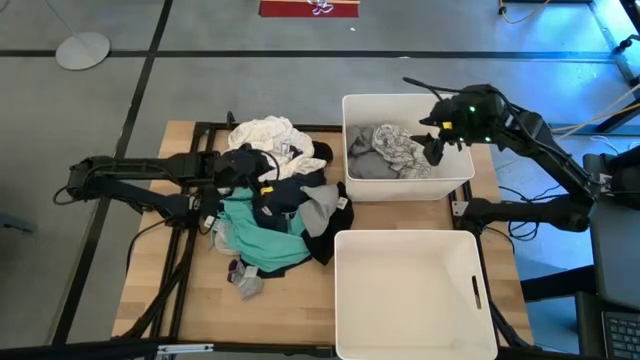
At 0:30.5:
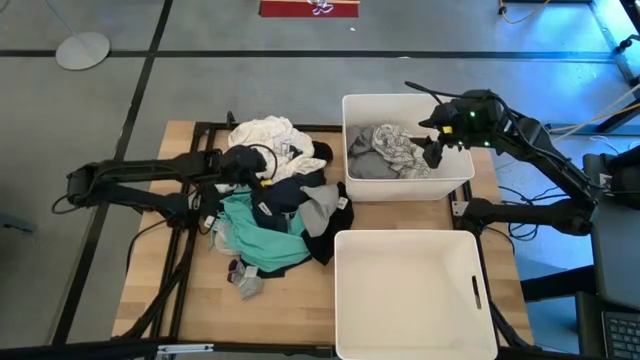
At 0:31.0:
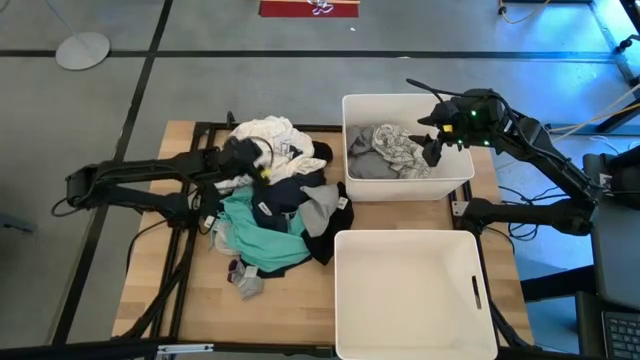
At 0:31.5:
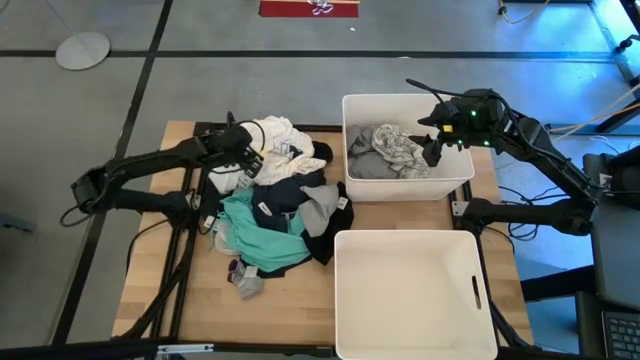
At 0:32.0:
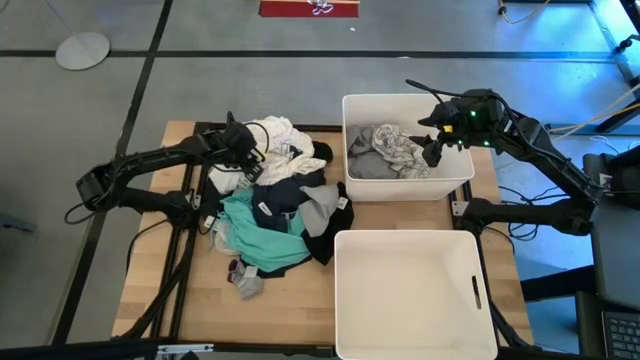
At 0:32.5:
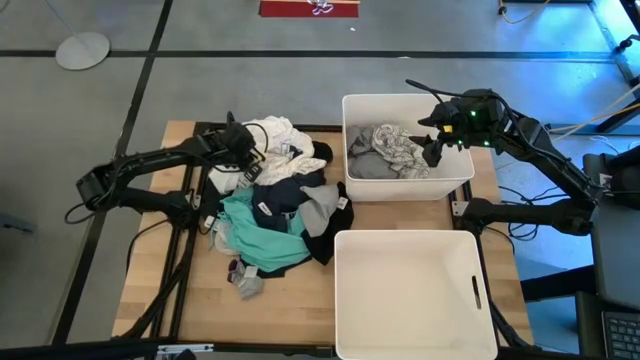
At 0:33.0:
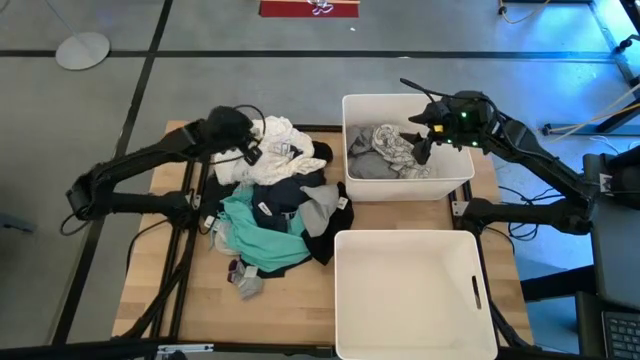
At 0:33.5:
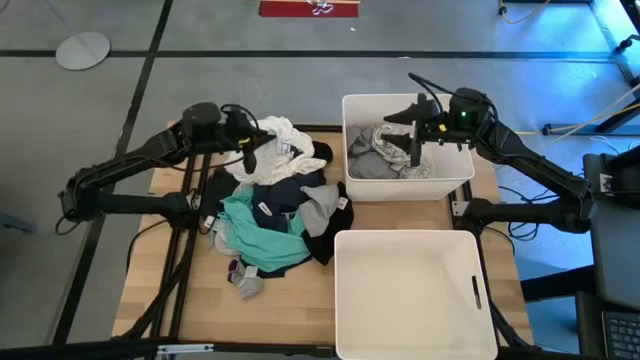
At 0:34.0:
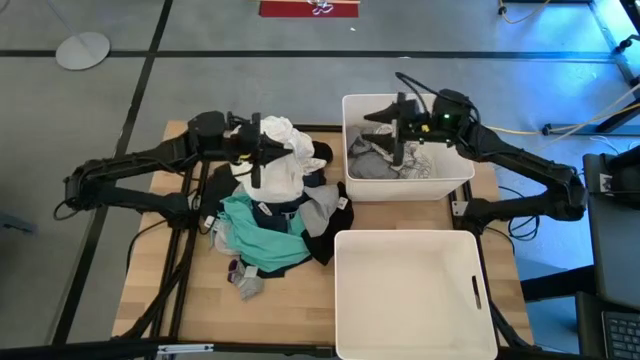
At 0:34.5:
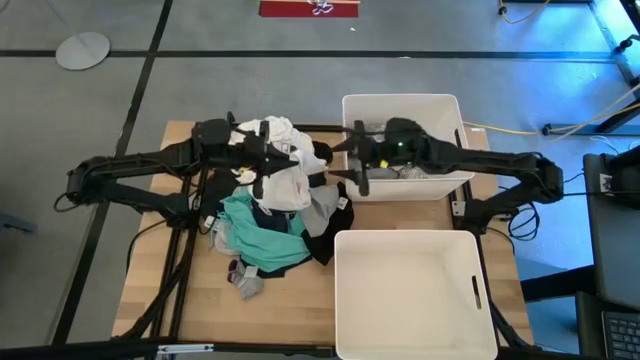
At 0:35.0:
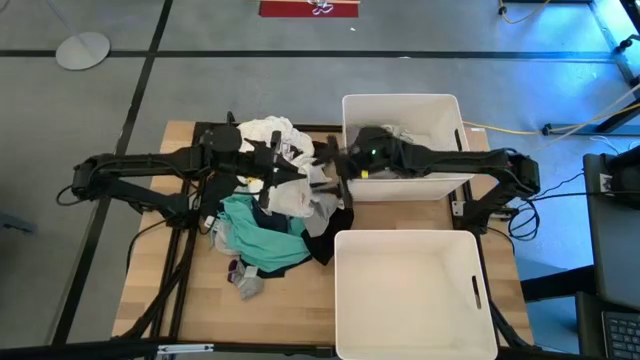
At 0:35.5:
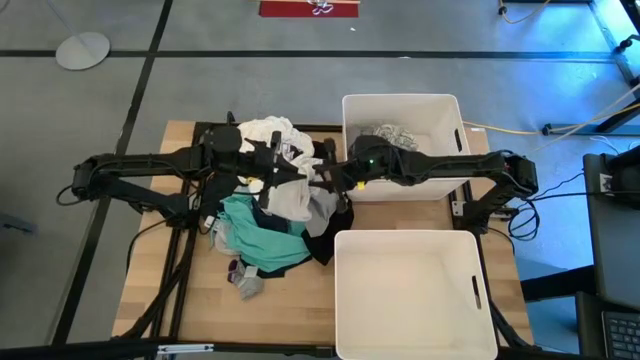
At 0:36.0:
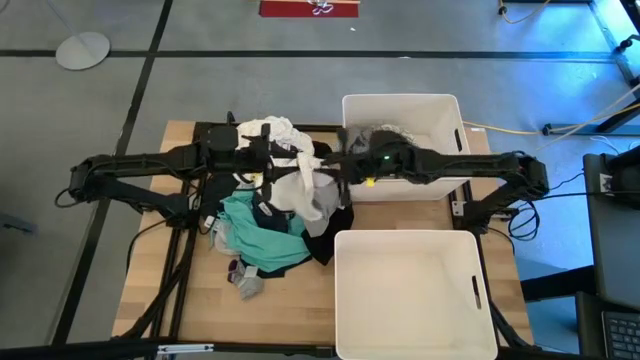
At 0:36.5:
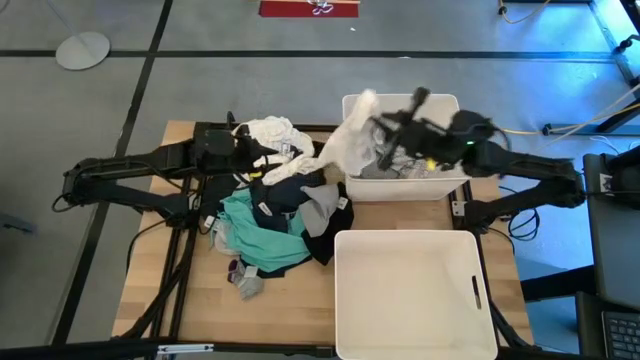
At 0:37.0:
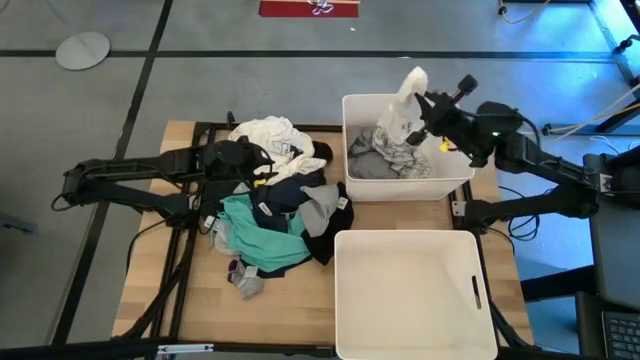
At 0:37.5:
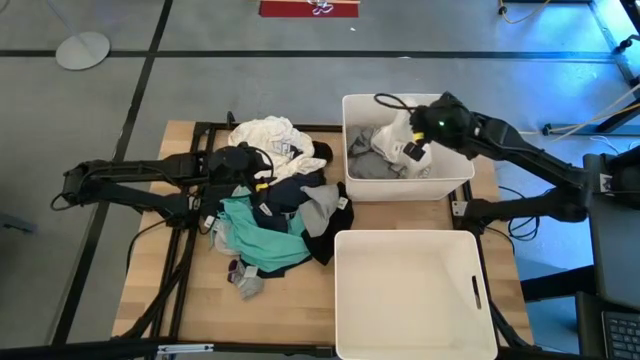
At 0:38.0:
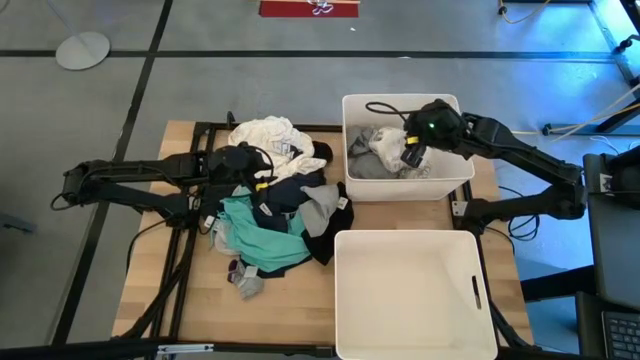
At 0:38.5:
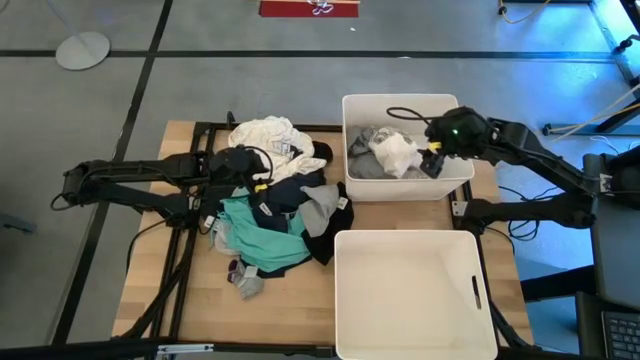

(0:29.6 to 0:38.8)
Task: Sort clothes
Put the white pants into the top white laundry bin

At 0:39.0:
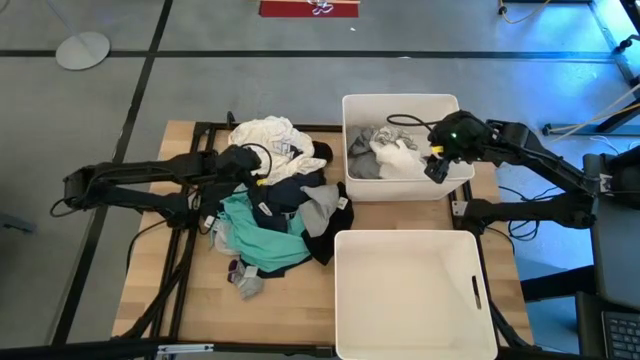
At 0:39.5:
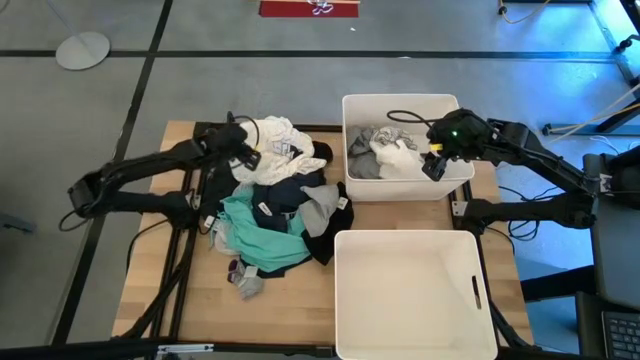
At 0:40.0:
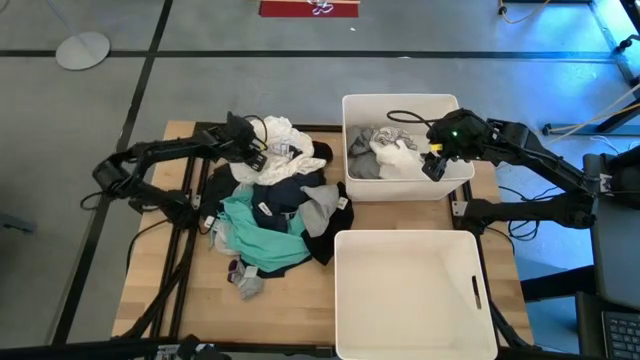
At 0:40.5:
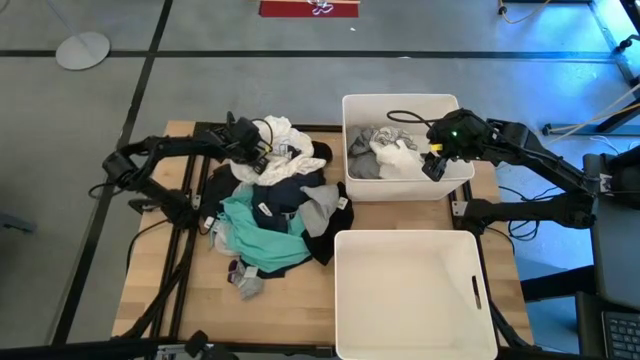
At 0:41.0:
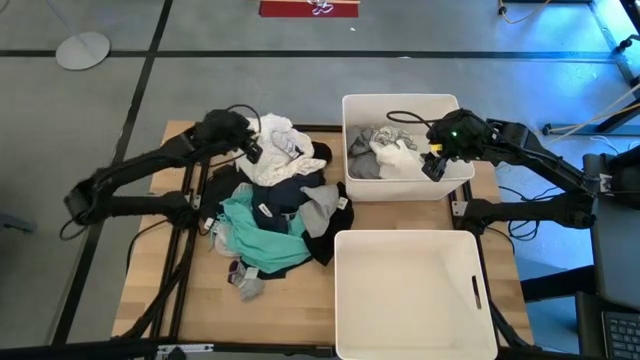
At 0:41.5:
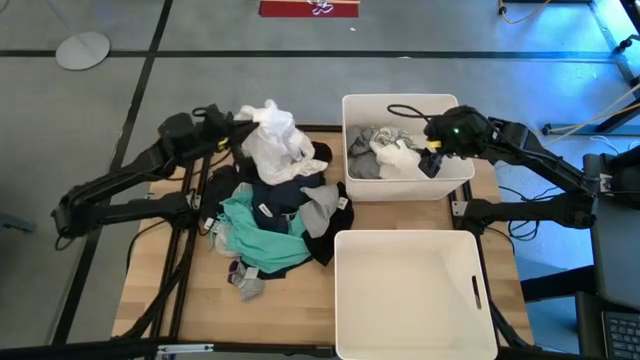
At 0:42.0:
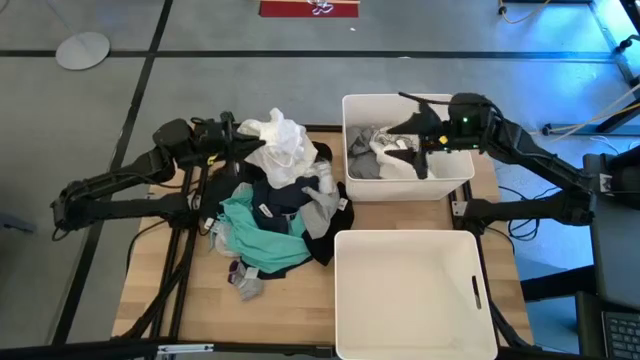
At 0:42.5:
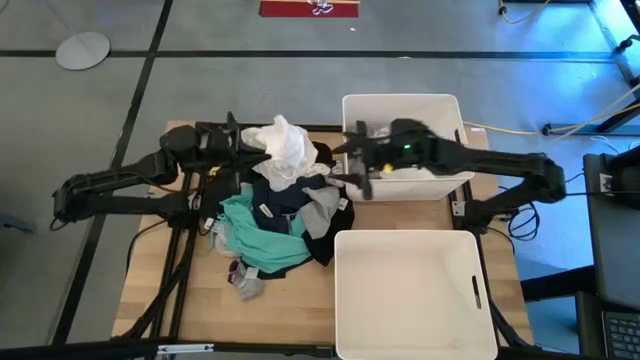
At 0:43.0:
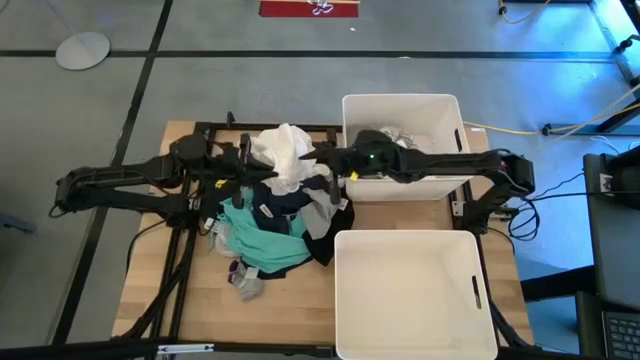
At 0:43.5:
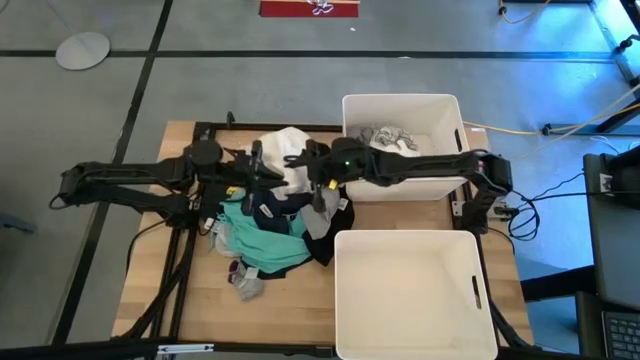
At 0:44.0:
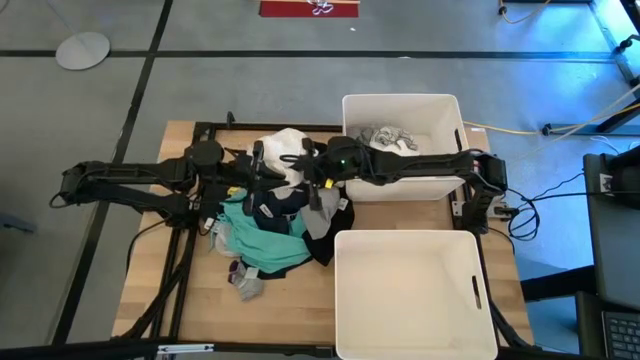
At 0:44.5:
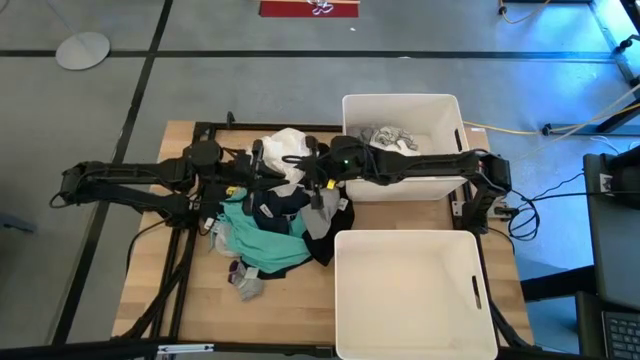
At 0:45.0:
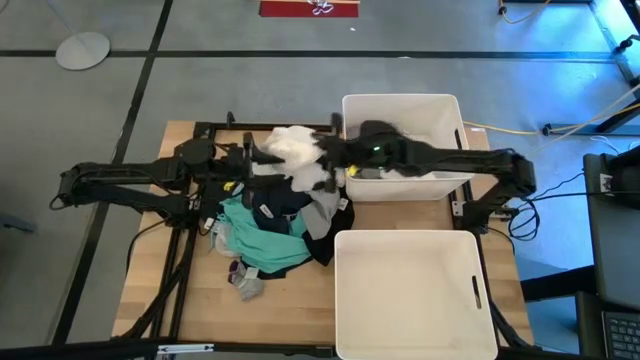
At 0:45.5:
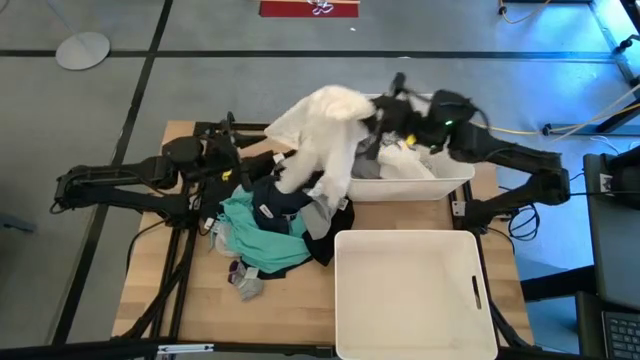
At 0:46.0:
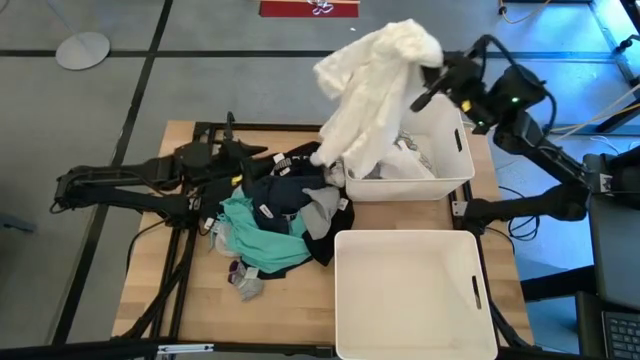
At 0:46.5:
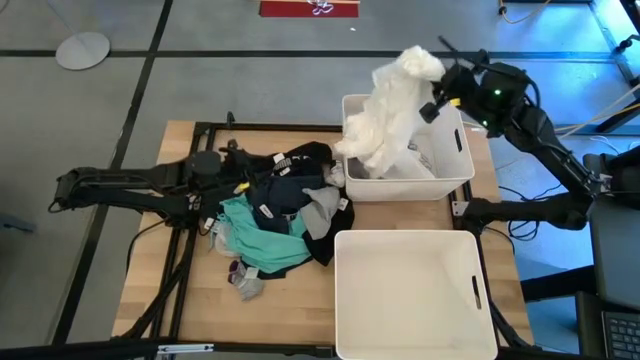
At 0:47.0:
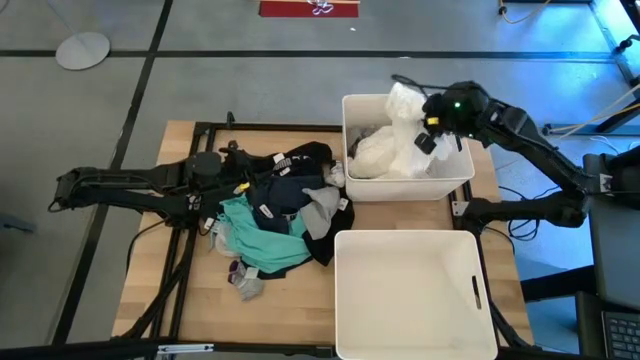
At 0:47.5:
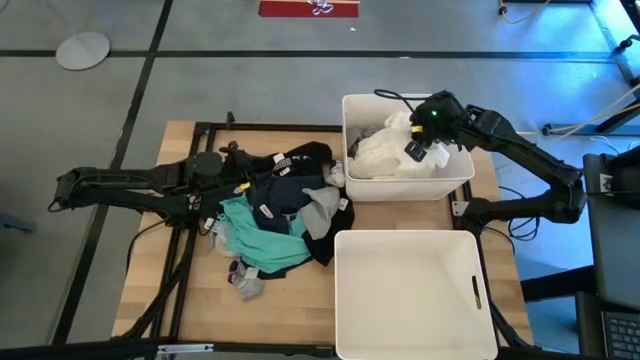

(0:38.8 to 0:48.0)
Put the white dress into the top white laundry bin

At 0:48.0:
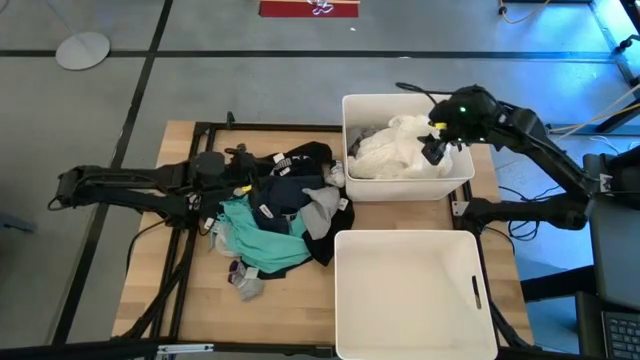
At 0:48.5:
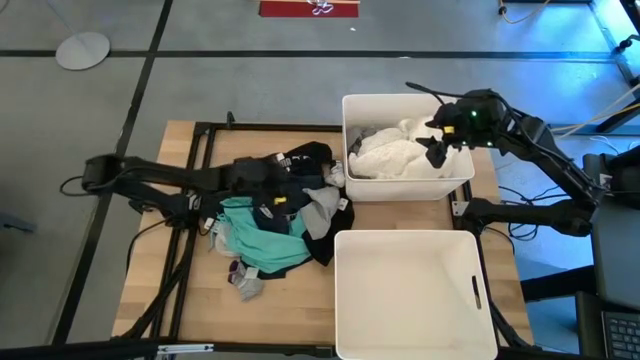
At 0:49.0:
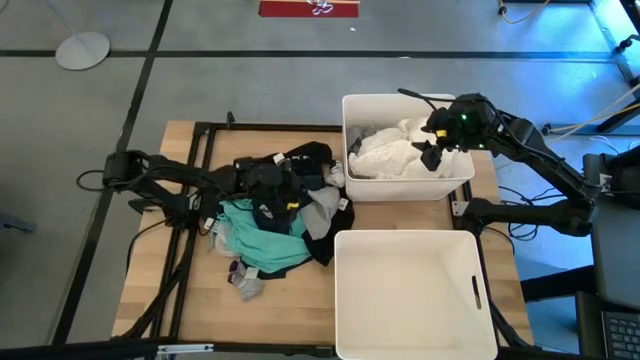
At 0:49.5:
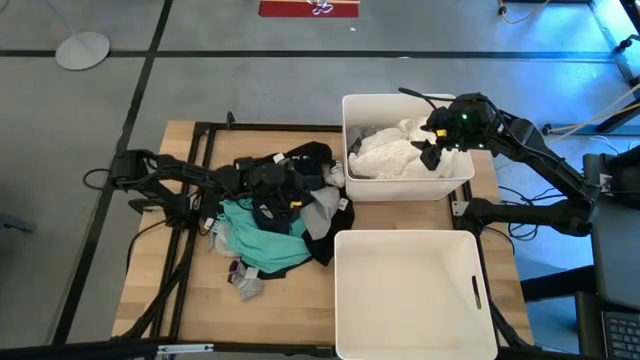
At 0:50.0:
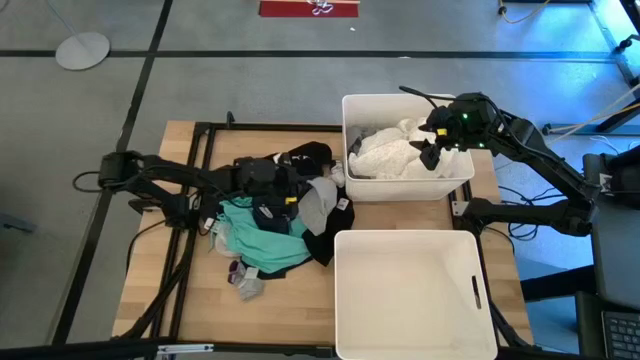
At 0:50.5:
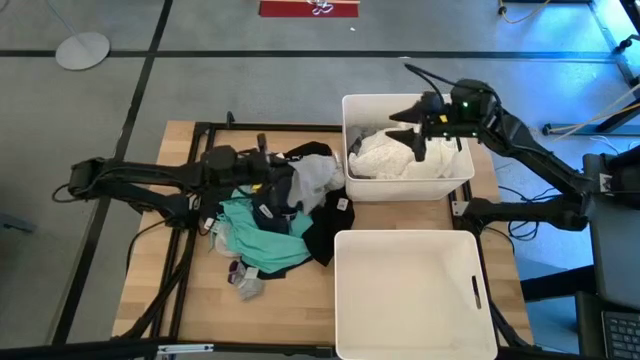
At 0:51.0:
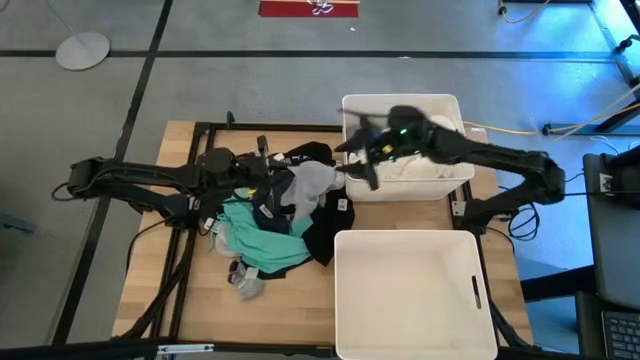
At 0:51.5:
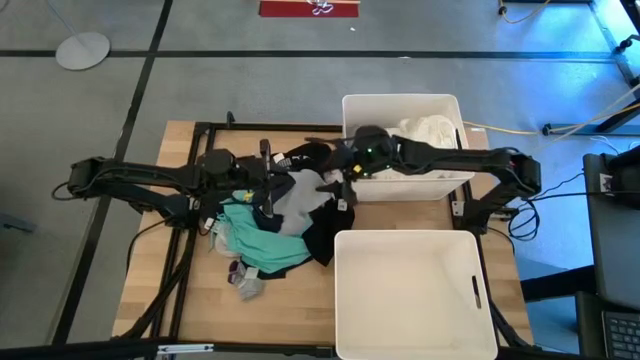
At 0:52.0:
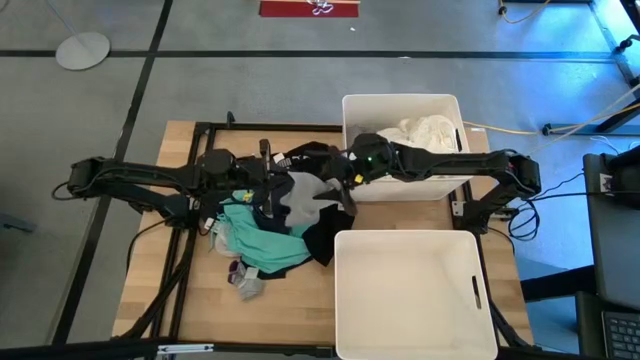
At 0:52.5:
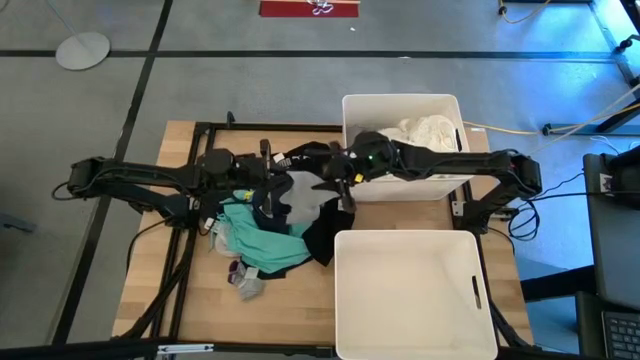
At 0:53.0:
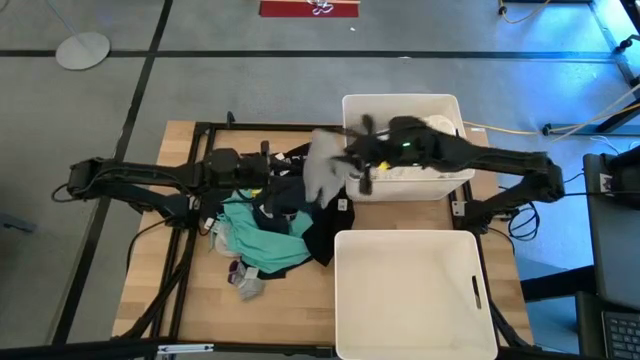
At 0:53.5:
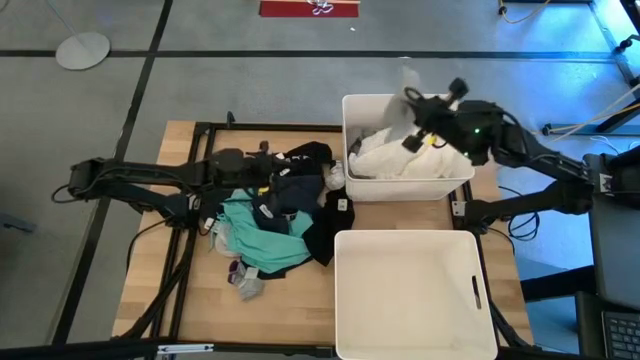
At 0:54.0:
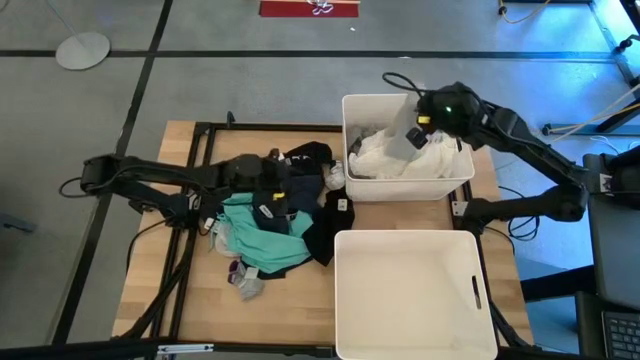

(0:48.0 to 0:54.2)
Put the gray pants into the top white laundry bin
